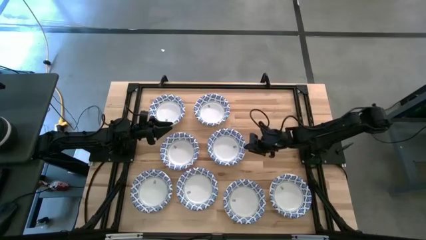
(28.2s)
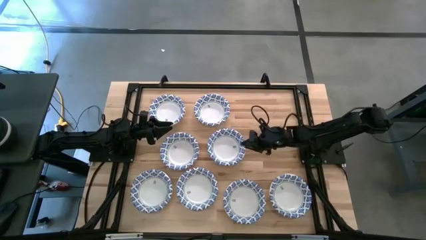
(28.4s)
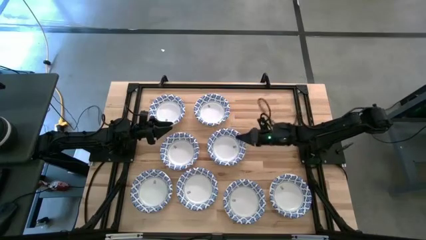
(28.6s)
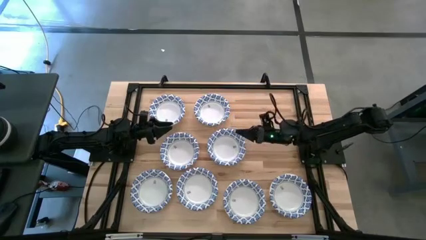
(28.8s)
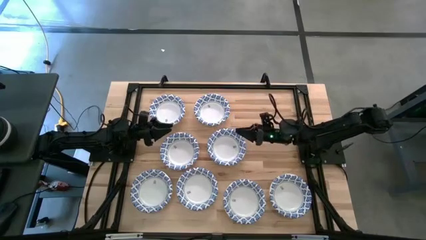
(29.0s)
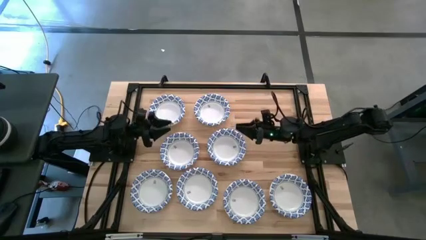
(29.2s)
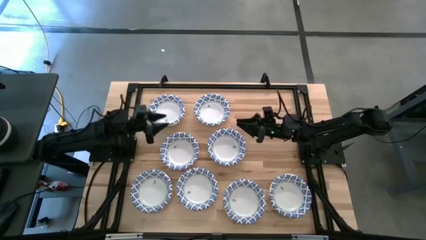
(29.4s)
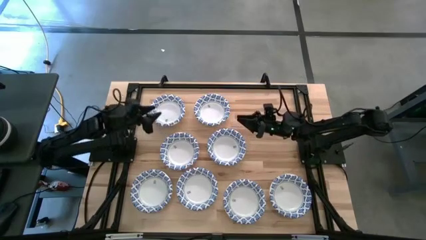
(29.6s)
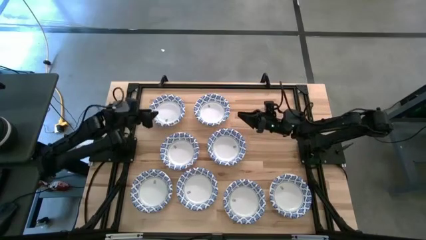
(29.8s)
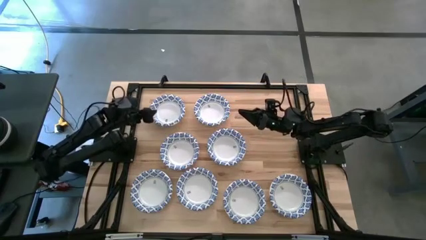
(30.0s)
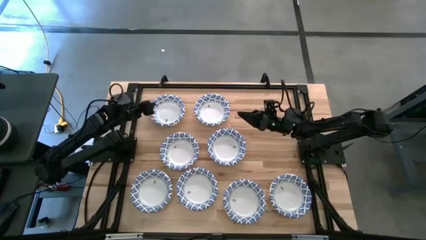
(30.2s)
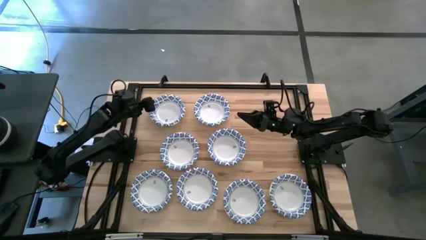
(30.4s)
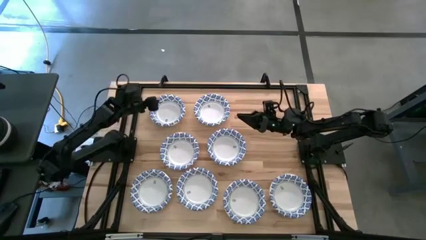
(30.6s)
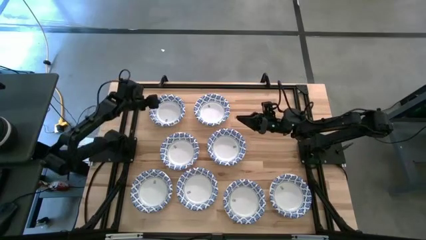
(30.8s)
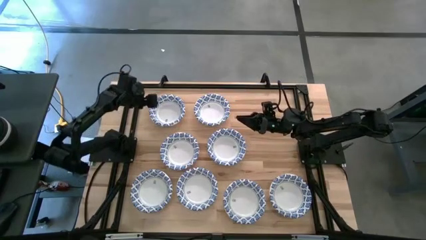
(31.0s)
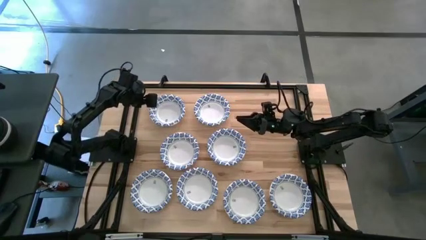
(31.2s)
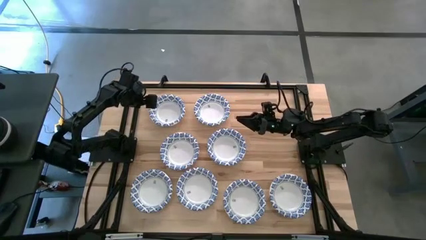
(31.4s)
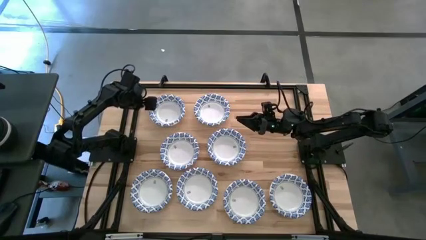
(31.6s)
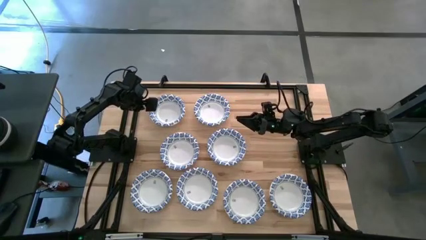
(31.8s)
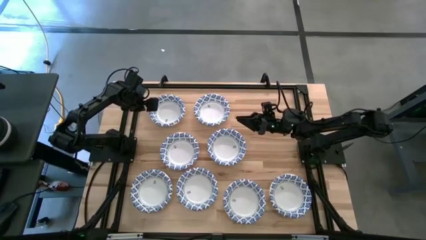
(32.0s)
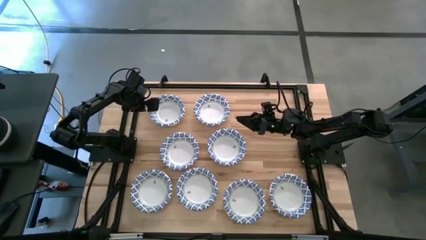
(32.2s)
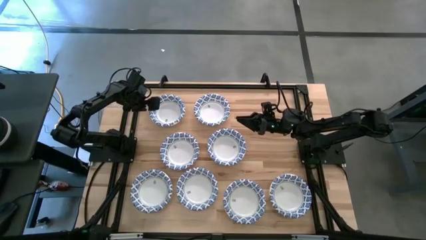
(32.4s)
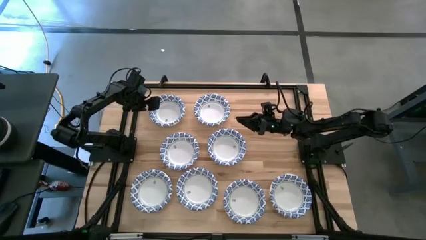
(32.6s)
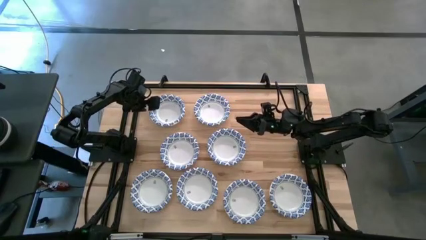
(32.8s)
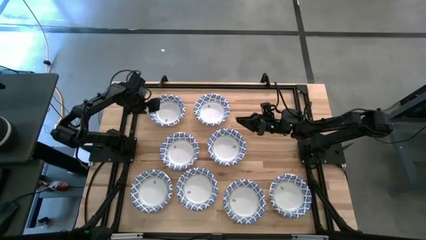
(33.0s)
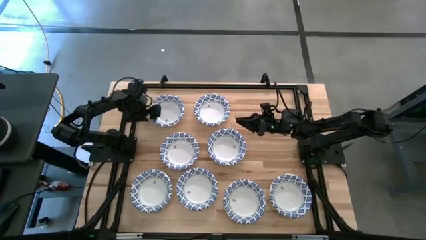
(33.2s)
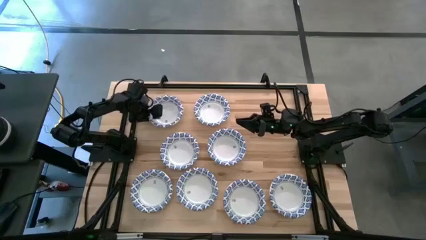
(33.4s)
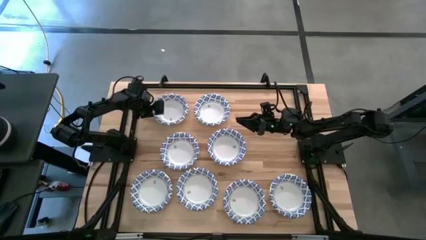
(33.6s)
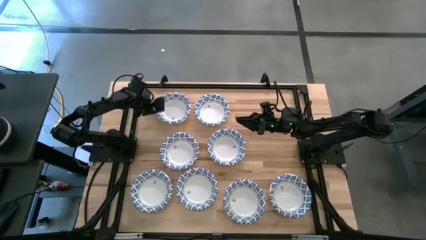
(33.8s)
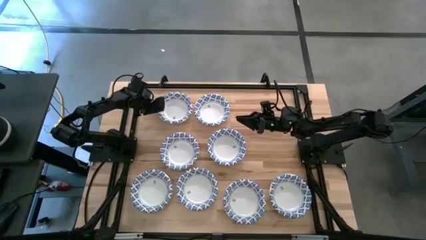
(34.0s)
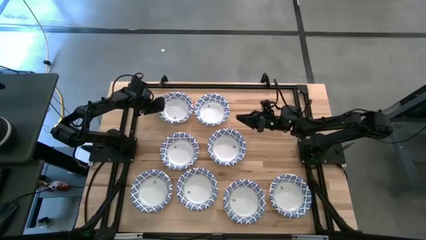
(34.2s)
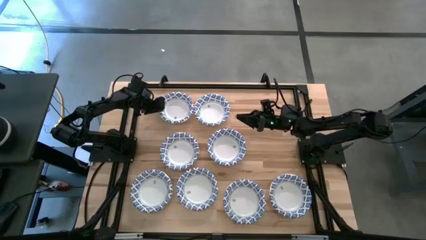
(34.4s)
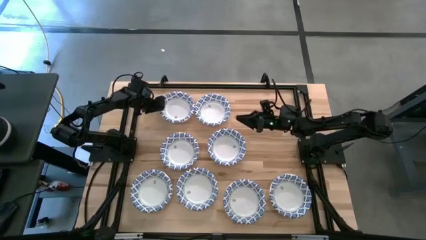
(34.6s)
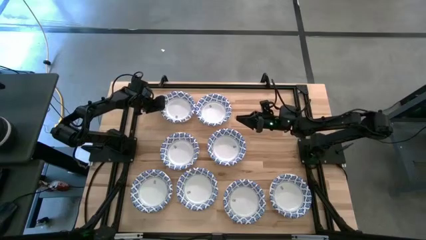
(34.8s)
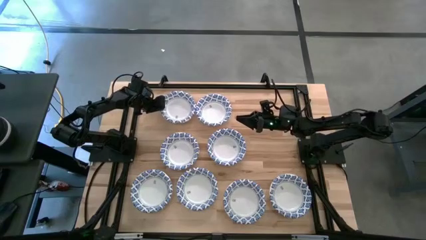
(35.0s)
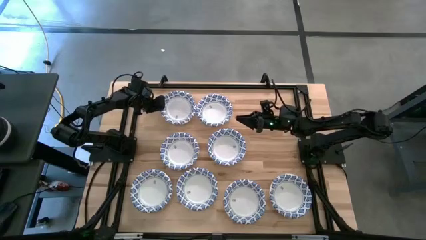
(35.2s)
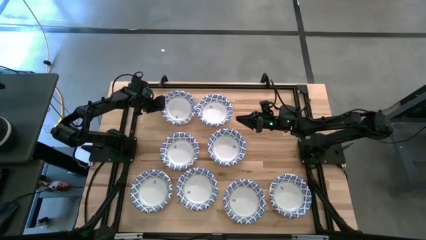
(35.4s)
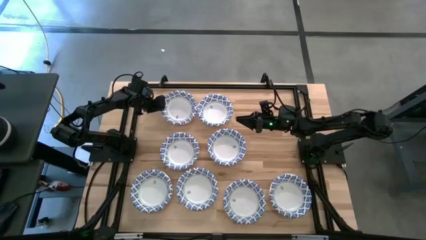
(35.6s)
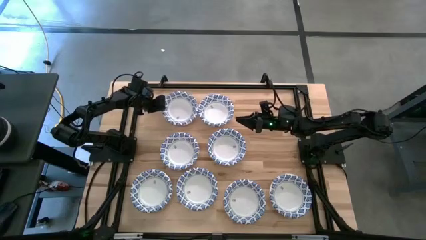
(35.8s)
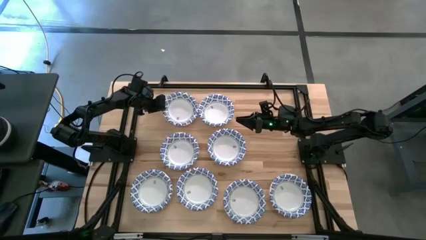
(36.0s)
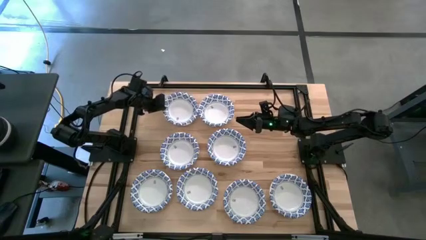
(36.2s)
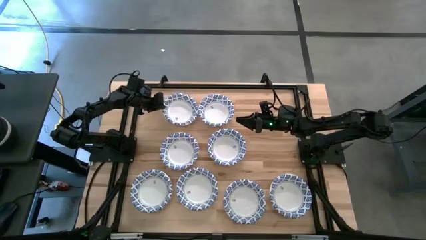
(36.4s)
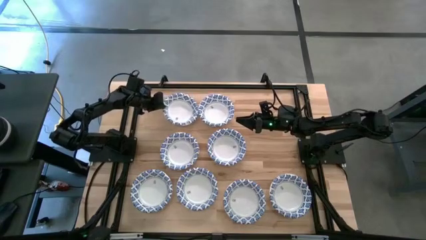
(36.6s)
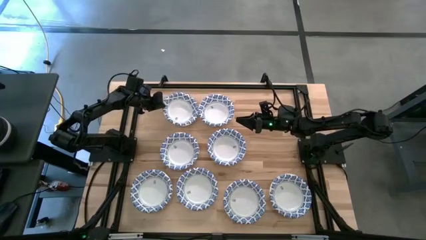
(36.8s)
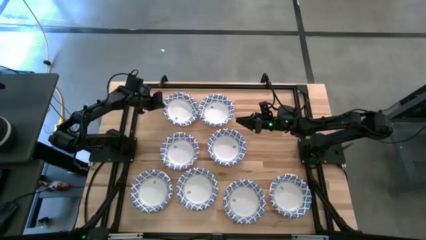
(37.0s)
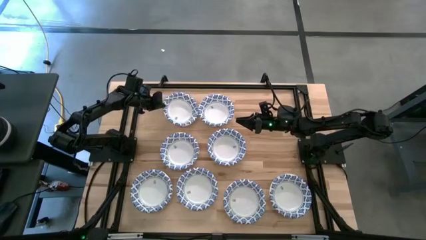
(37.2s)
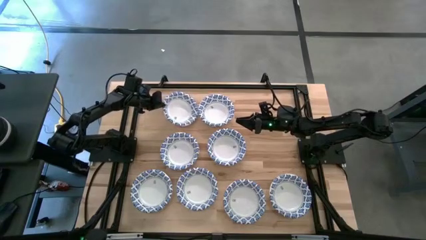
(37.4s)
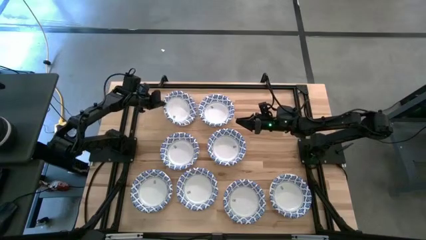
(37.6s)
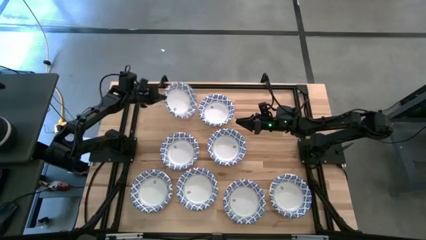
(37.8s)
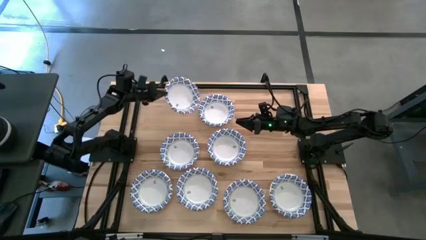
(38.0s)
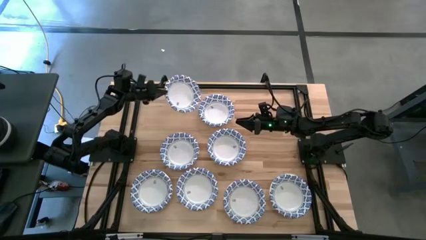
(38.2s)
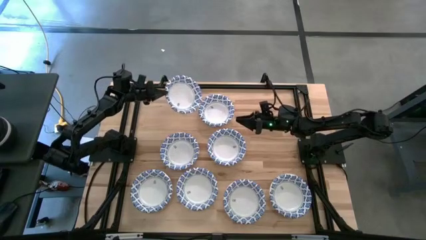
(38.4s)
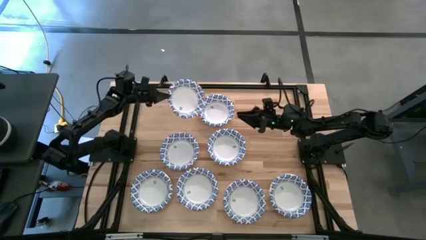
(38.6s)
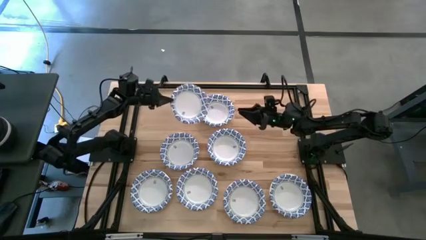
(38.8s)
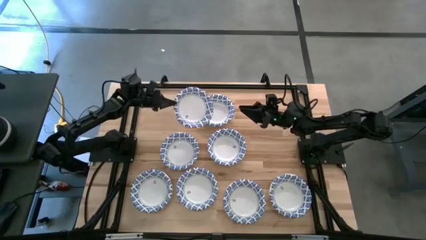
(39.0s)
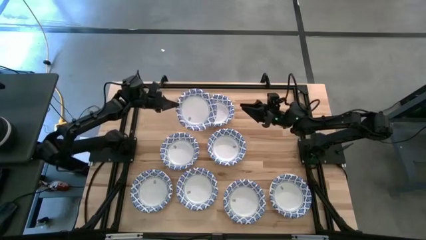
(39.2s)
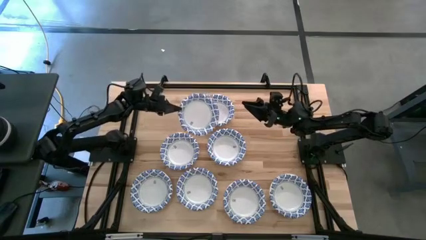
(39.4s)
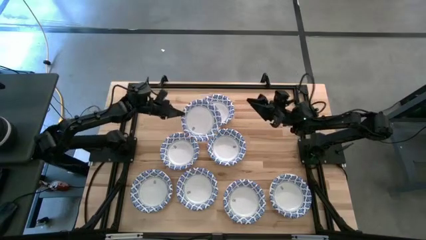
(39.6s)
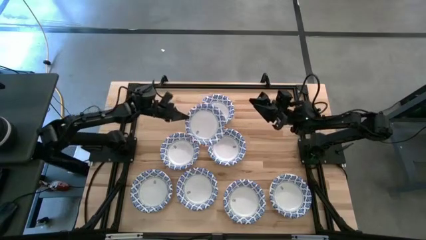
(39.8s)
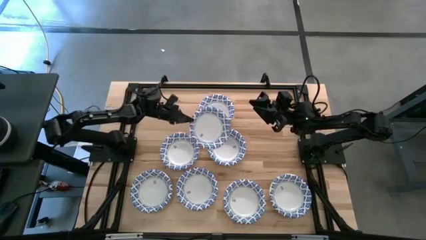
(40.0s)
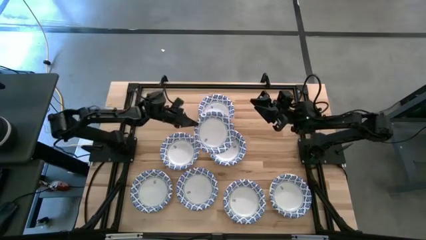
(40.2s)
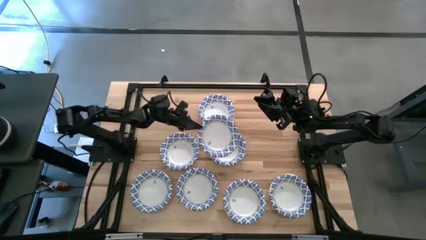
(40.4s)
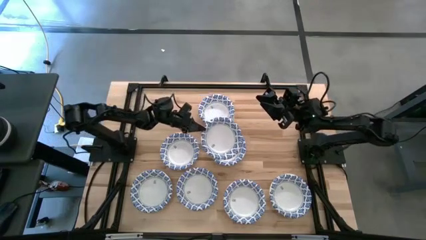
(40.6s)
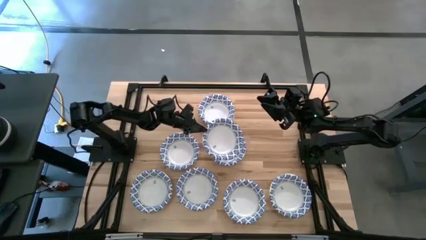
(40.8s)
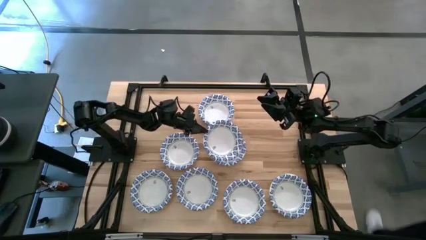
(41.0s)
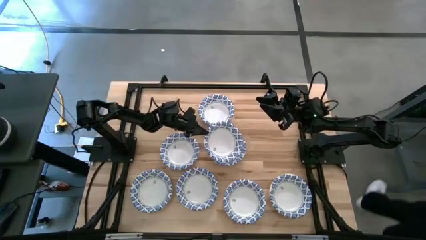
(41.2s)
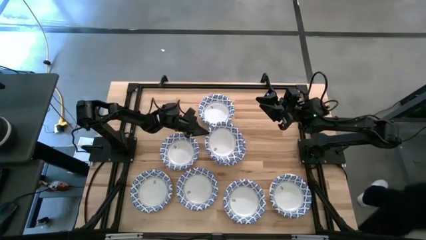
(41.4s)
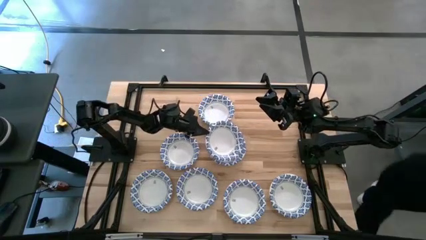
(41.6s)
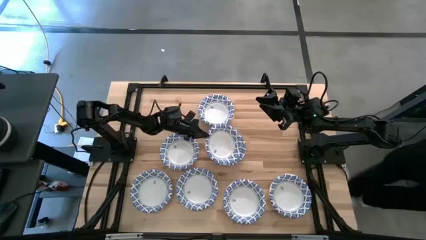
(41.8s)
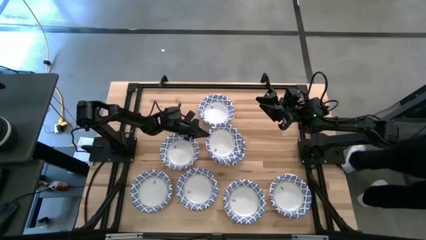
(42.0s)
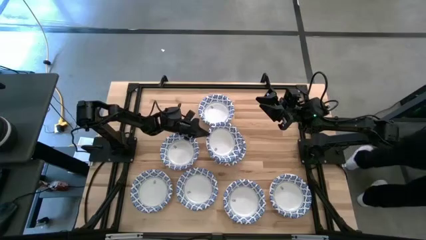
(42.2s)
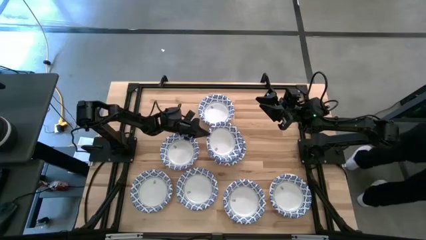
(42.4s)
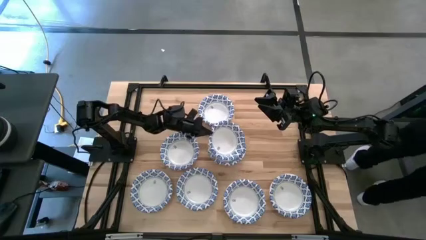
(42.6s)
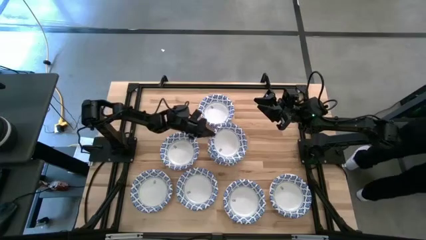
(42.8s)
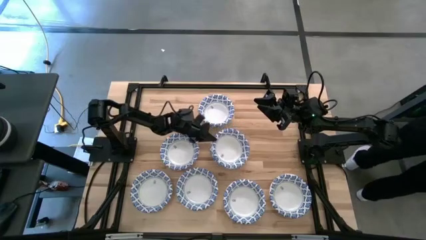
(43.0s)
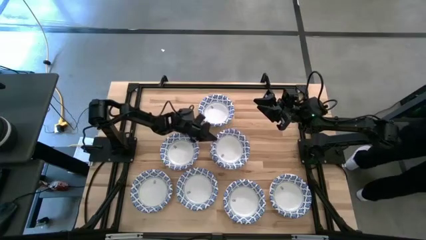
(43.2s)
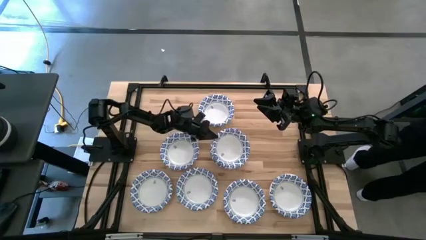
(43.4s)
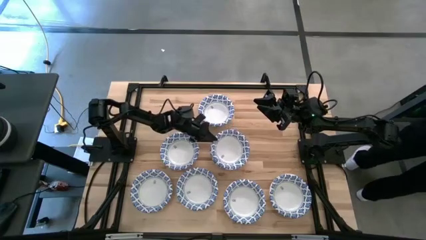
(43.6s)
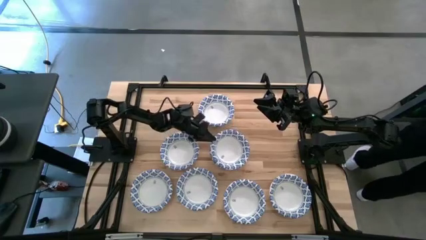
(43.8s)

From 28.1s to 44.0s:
Task: Nest bowls inside each other
Stack the white patterned bowl on top of the other white patterned bowl
